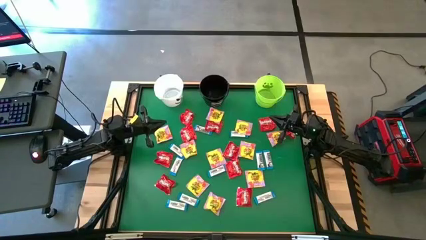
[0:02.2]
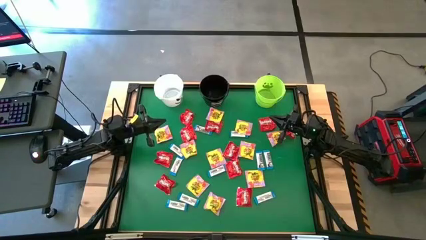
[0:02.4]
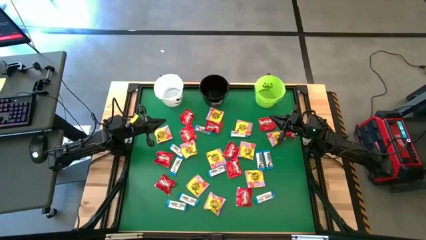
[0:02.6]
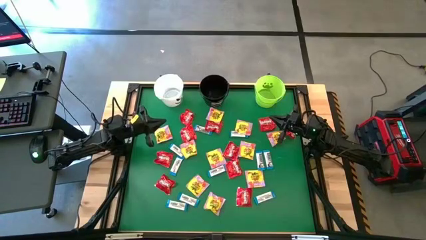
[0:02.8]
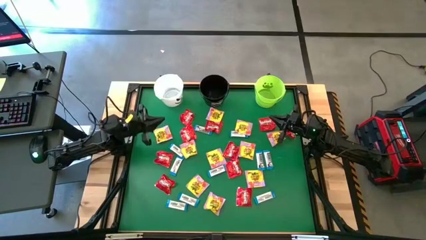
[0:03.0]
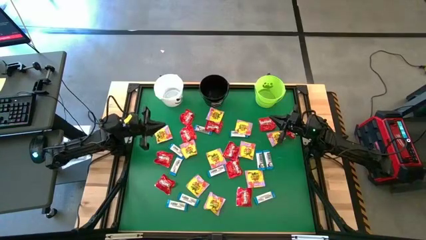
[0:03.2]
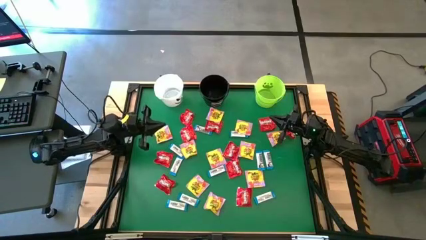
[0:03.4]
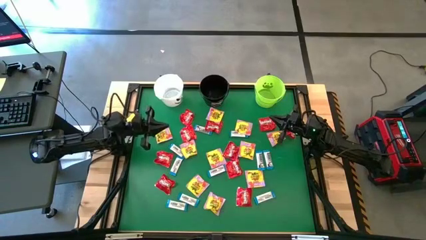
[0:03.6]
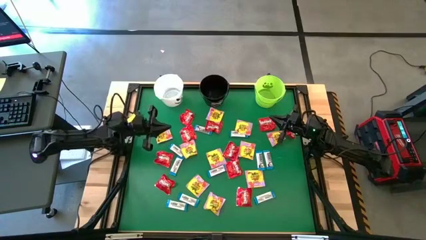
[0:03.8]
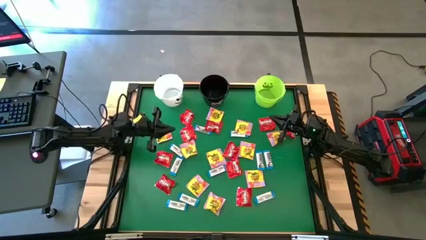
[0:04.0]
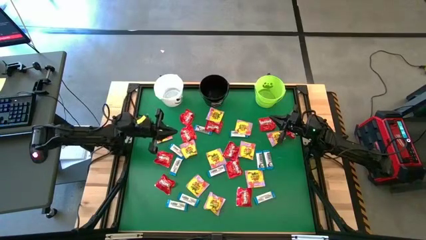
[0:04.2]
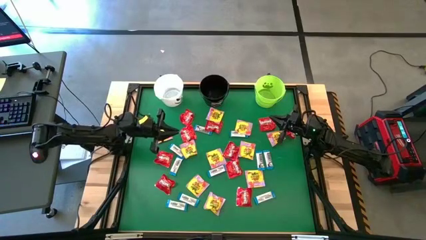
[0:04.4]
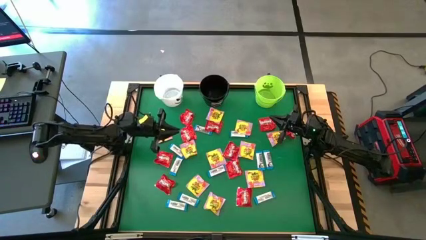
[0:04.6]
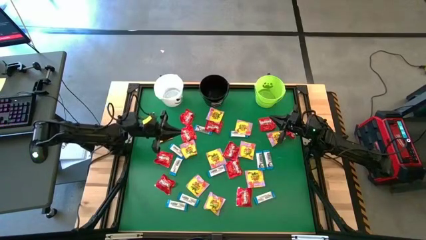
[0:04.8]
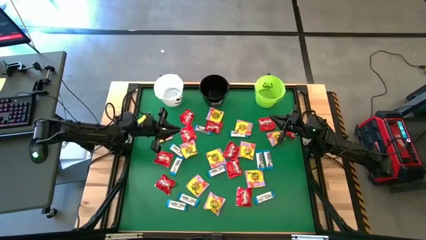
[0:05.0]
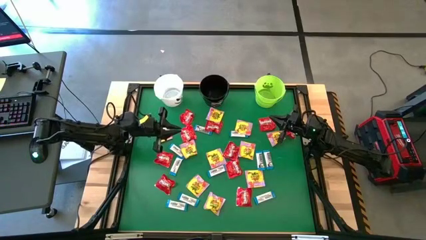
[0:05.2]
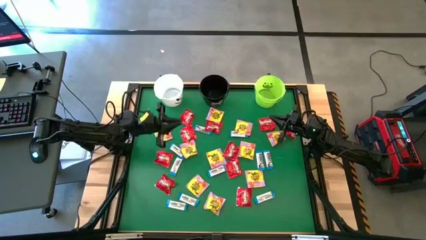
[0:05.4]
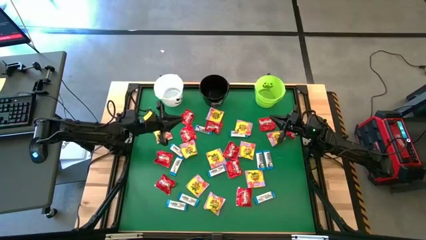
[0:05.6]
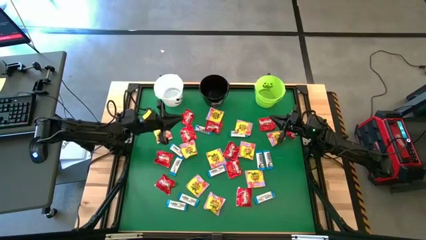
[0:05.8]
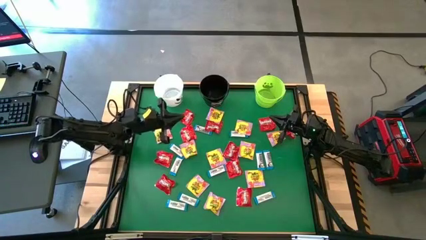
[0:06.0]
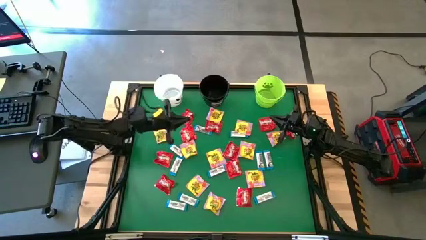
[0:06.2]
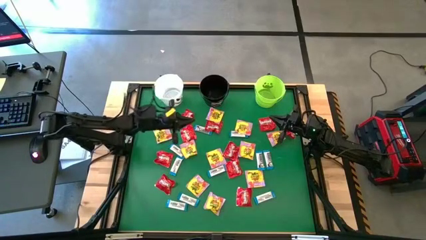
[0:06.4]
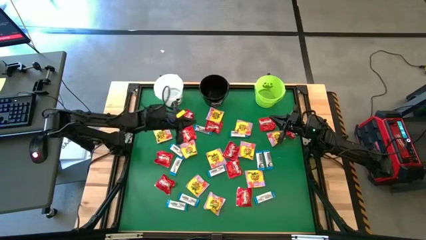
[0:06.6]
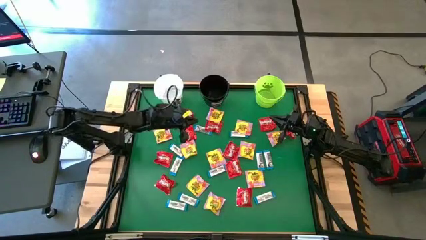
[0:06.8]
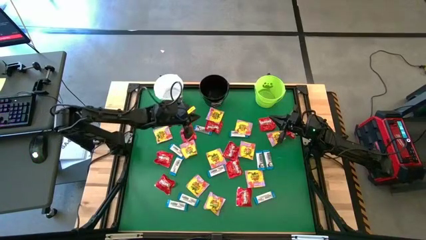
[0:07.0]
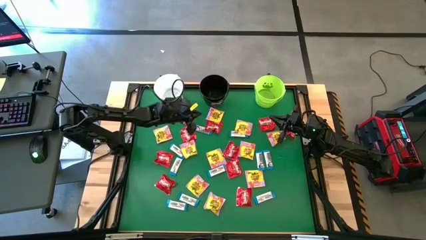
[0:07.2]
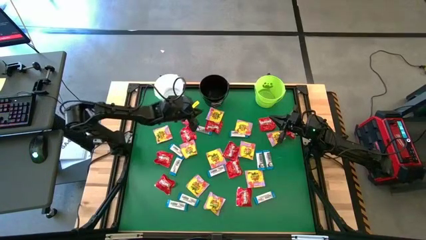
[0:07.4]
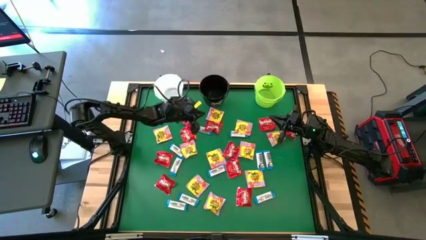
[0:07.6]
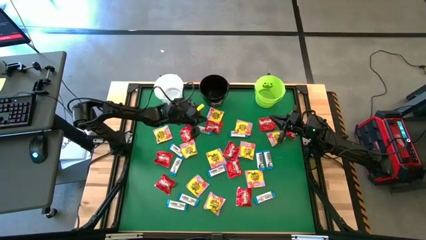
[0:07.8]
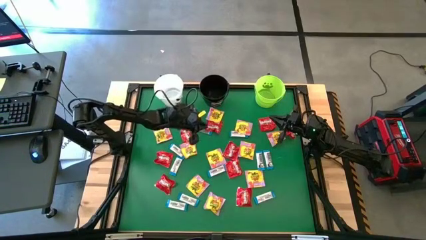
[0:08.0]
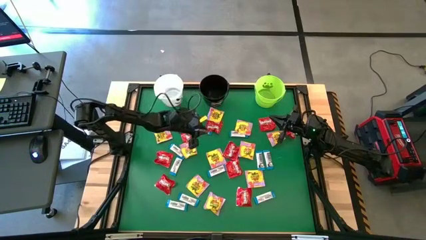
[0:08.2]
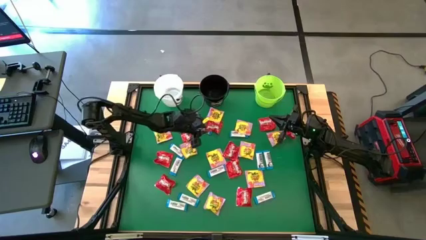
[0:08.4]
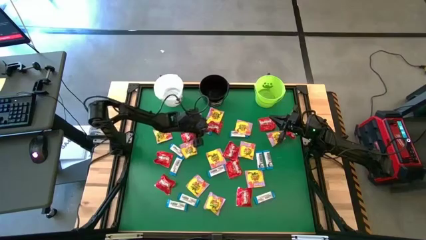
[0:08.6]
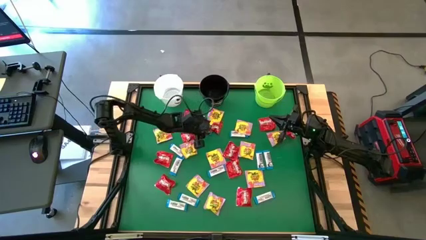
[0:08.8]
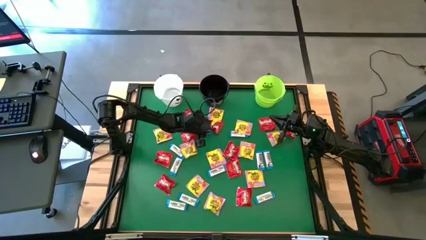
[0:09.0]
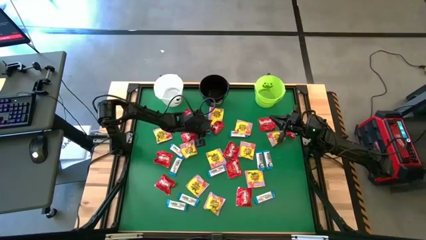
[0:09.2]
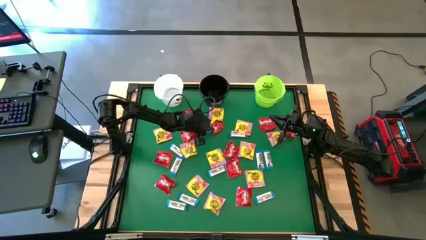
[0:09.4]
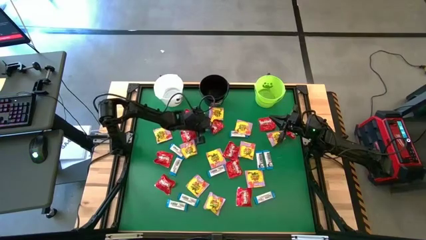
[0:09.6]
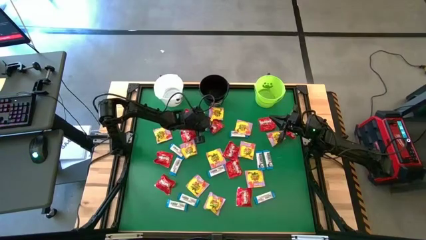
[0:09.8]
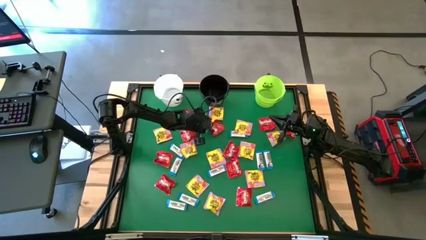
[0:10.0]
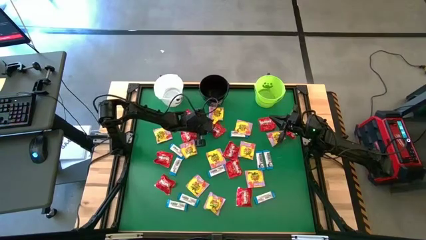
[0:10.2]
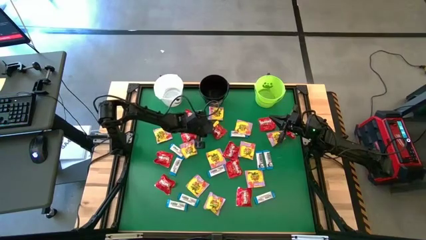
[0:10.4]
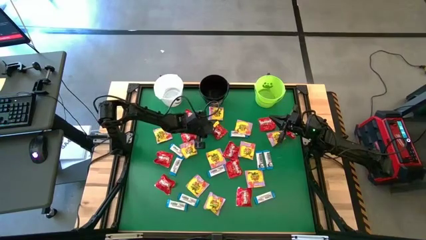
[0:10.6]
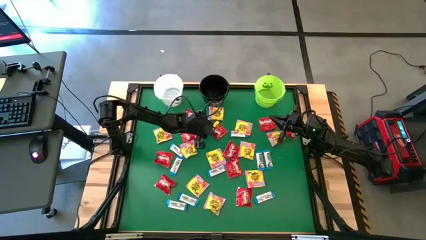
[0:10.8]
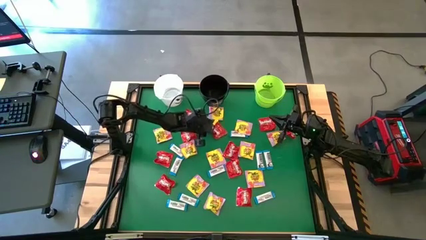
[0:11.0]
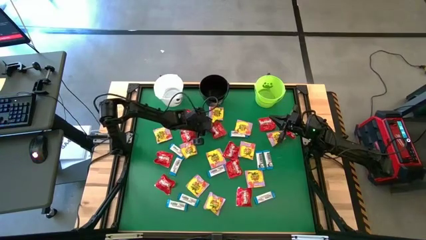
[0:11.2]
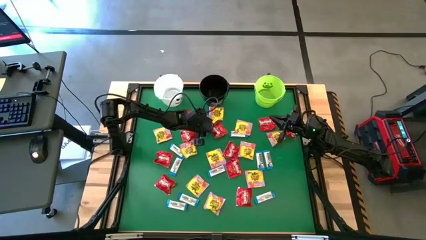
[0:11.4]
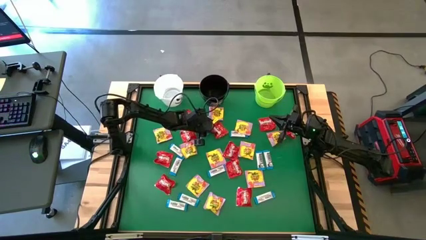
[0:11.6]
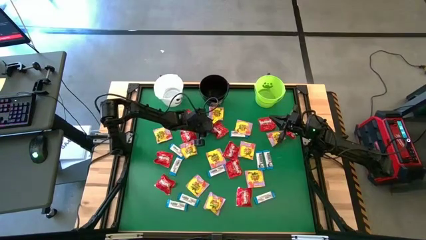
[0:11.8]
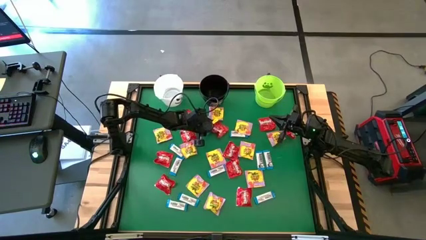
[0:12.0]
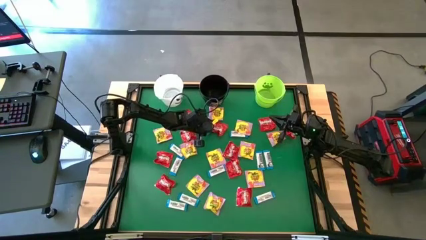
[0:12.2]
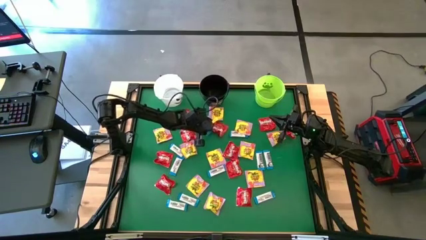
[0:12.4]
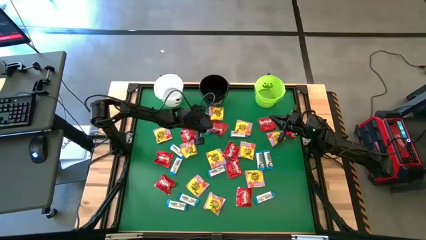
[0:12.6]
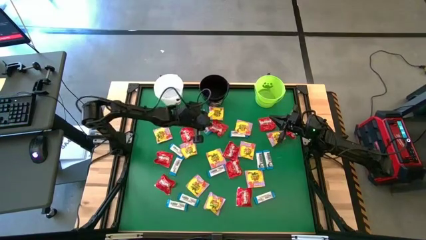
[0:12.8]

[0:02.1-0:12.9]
Task: Sort candy by brand, put in halloween buckets
Put the red candy into the black bucket

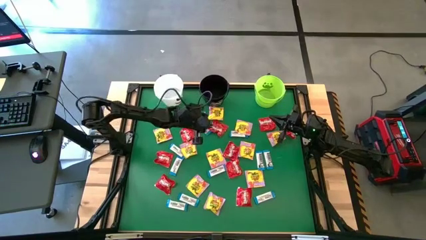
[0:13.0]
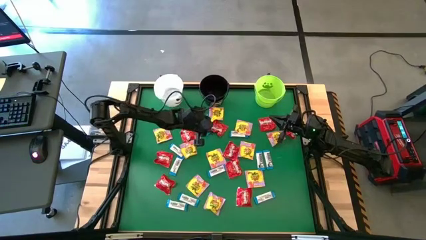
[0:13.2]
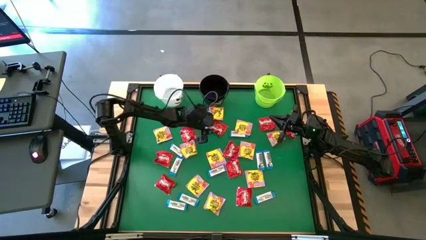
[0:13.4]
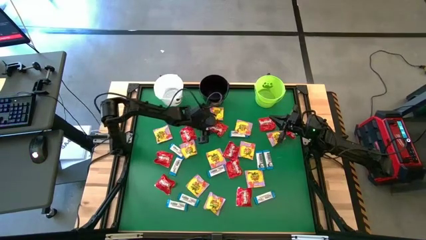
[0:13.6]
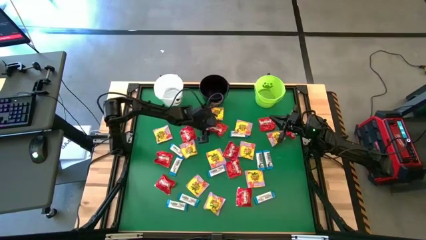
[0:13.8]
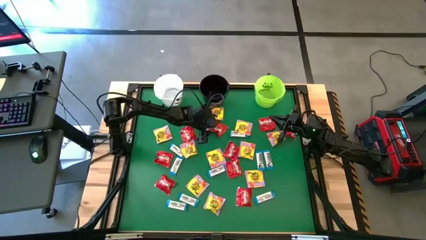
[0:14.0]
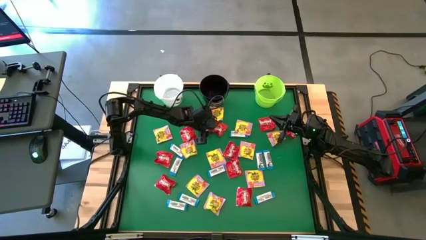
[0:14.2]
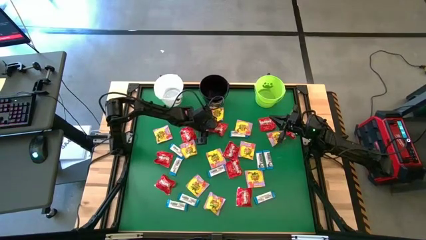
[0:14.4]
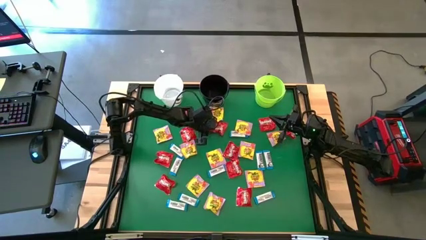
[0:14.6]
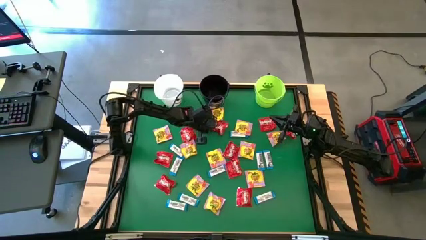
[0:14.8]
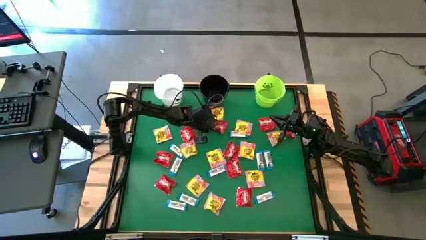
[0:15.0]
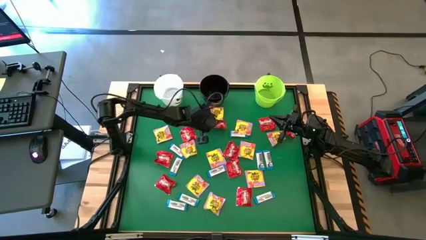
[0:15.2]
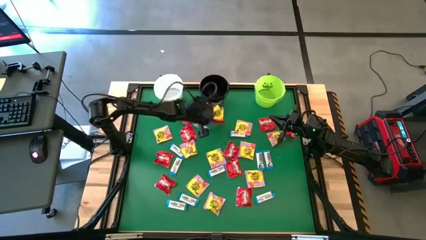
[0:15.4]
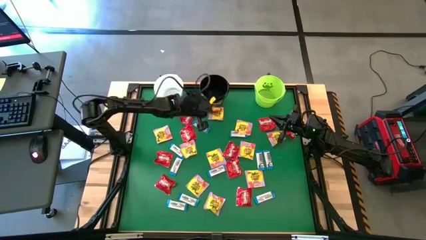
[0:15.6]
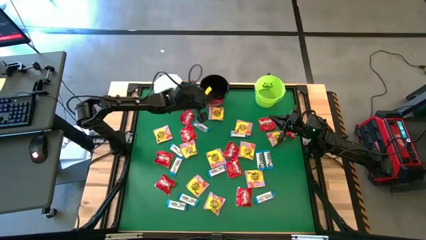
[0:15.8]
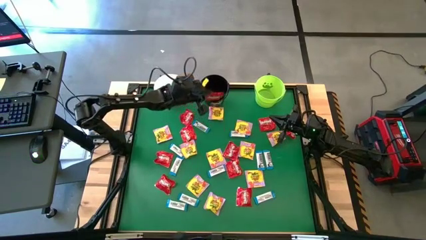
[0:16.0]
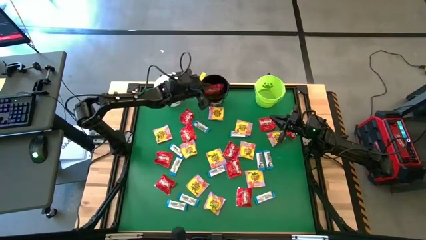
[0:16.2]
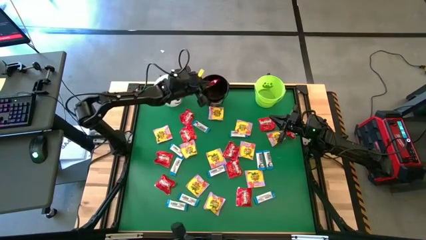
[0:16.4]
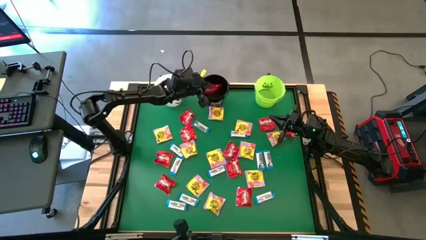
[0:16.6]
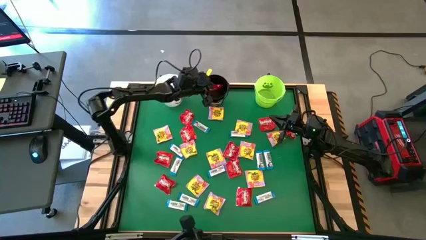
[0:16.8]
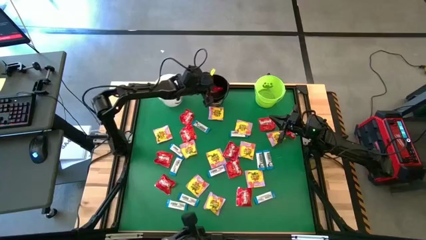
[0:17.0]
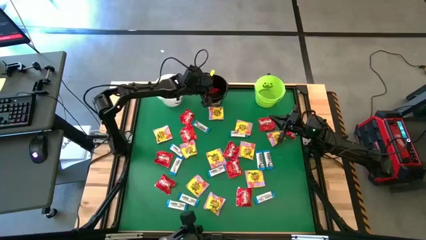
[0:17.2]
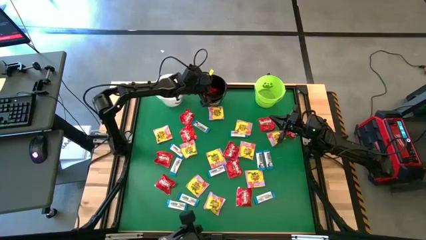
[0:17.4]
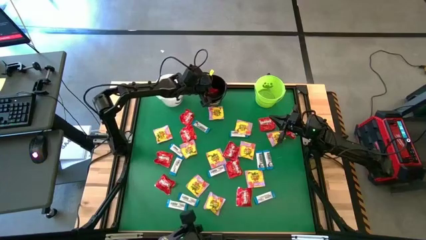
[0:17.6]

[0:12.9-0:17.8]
Put the red candy into the black bucket
